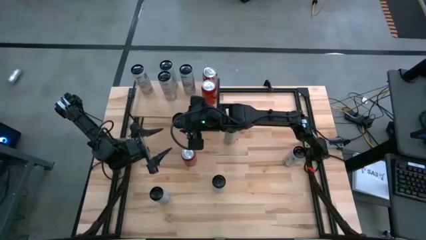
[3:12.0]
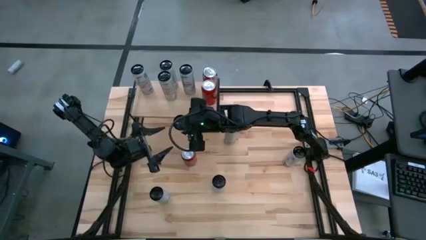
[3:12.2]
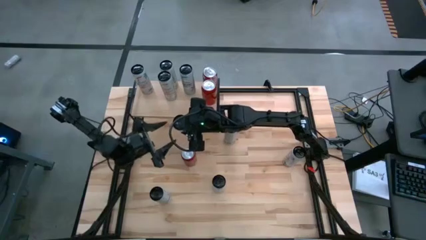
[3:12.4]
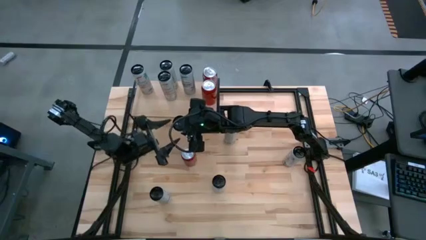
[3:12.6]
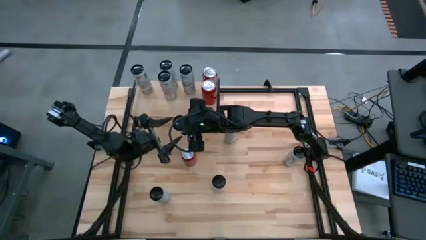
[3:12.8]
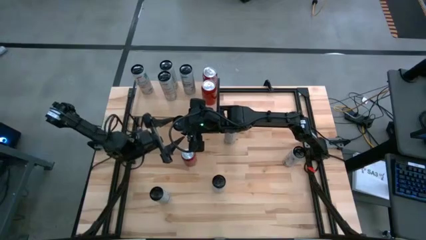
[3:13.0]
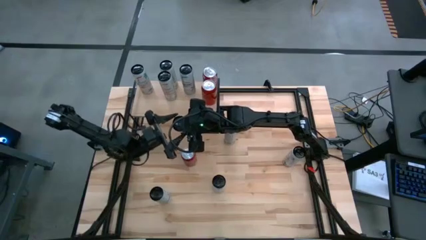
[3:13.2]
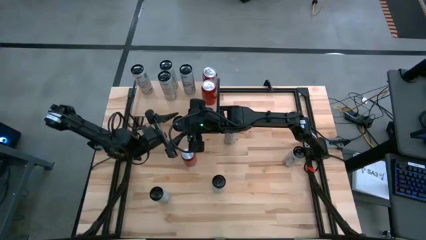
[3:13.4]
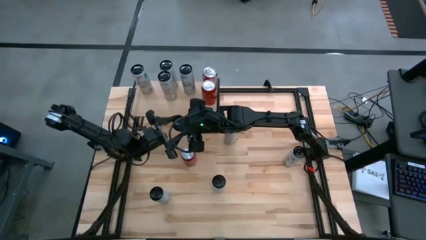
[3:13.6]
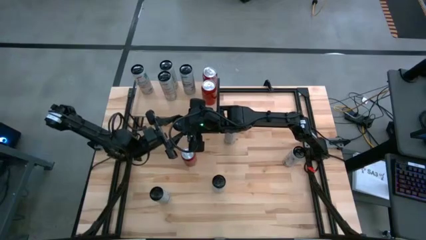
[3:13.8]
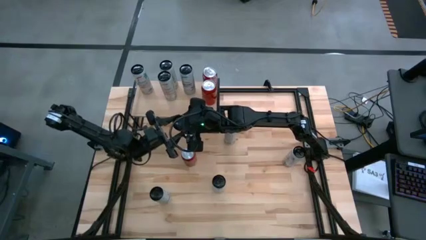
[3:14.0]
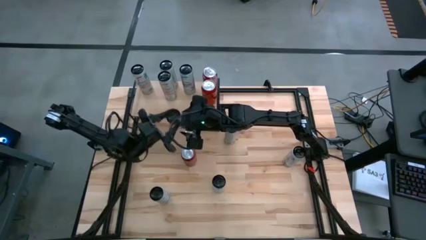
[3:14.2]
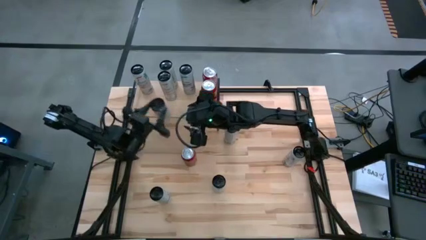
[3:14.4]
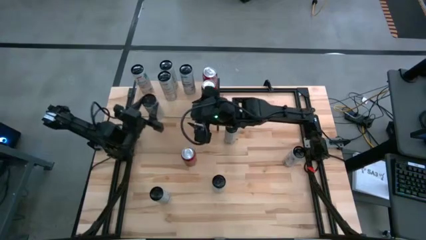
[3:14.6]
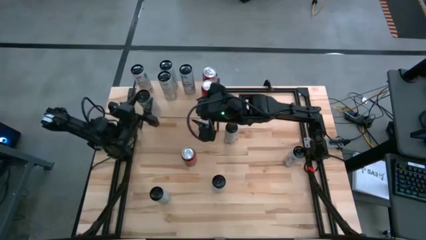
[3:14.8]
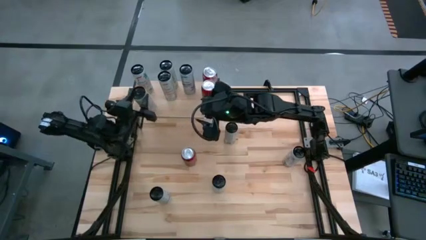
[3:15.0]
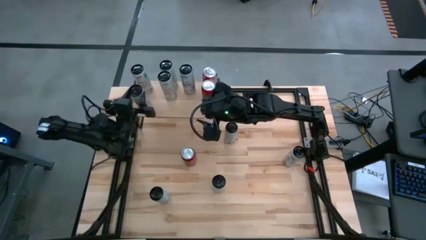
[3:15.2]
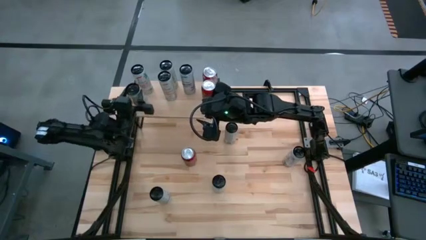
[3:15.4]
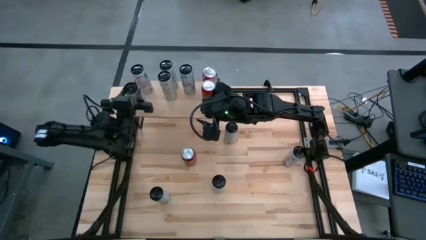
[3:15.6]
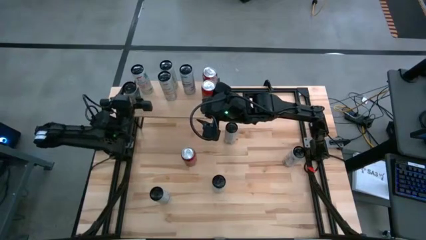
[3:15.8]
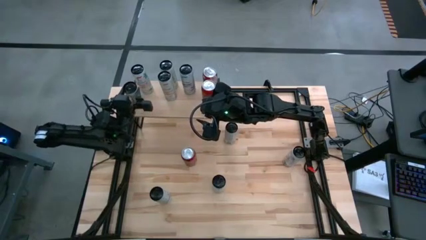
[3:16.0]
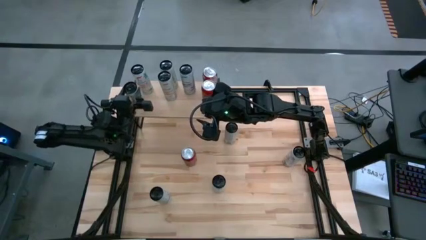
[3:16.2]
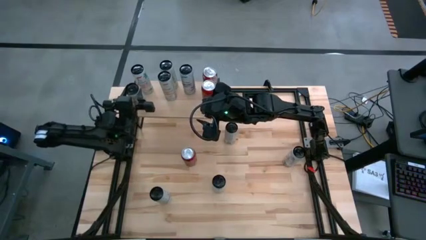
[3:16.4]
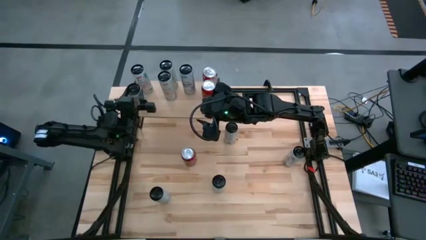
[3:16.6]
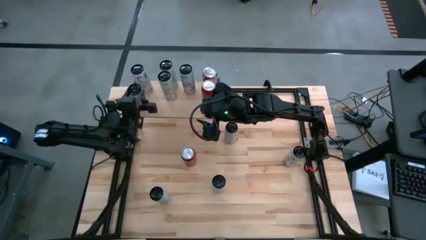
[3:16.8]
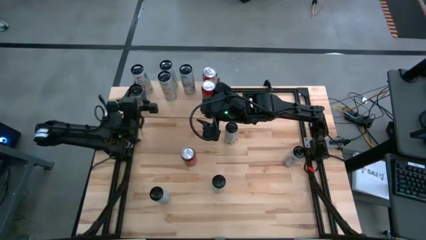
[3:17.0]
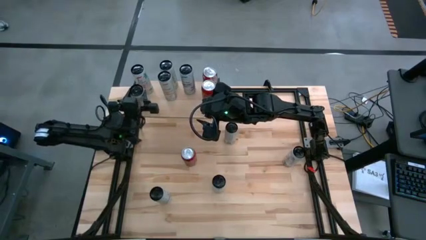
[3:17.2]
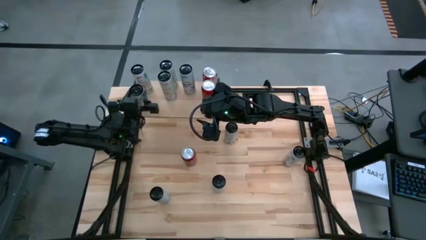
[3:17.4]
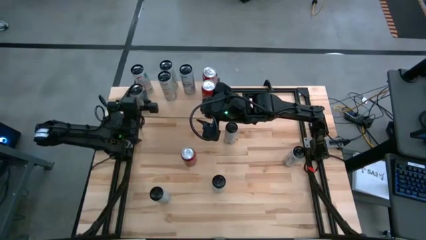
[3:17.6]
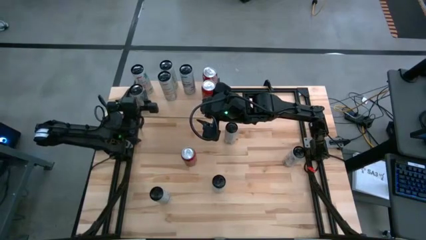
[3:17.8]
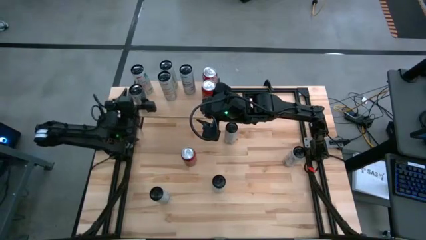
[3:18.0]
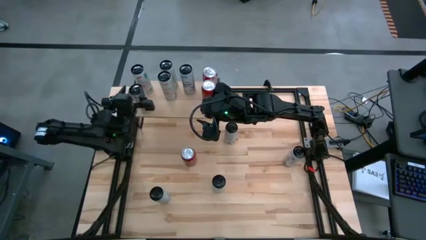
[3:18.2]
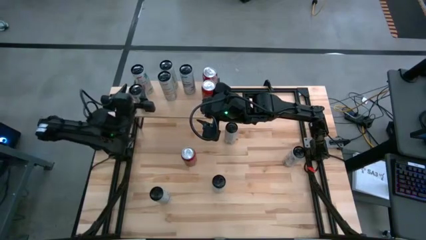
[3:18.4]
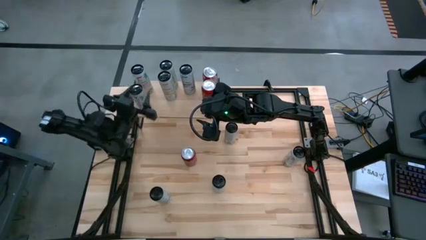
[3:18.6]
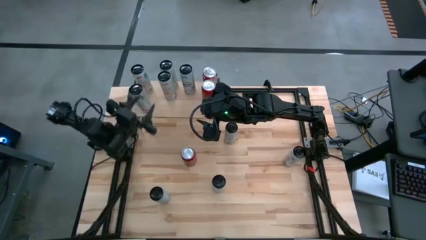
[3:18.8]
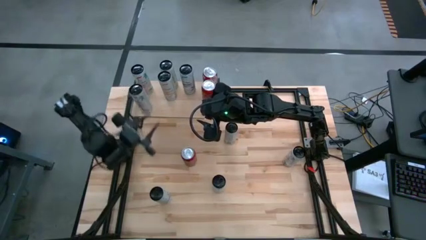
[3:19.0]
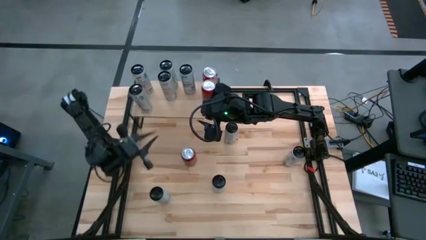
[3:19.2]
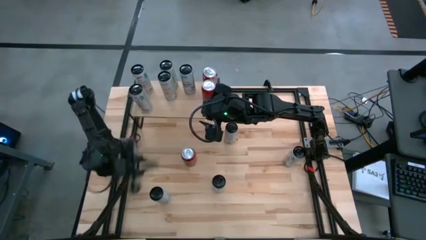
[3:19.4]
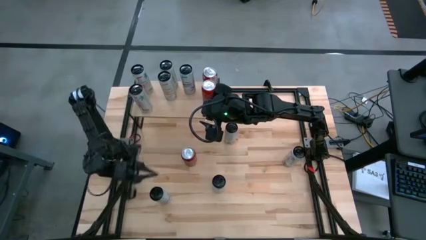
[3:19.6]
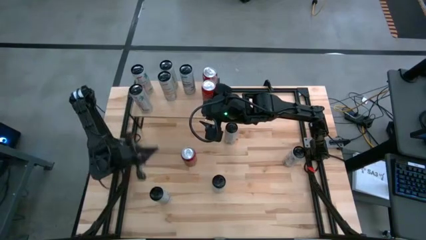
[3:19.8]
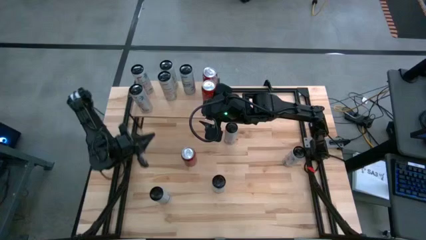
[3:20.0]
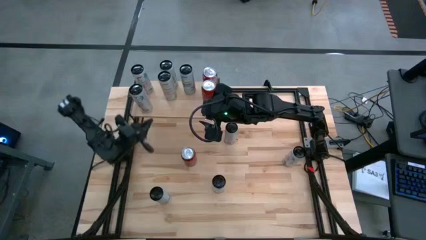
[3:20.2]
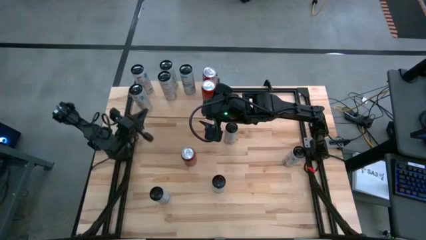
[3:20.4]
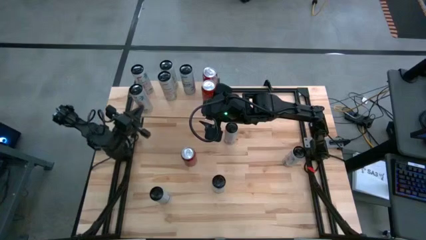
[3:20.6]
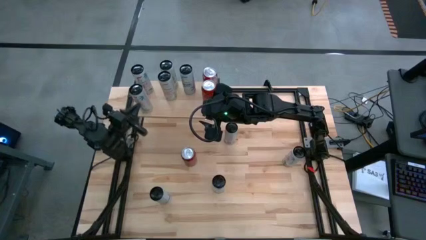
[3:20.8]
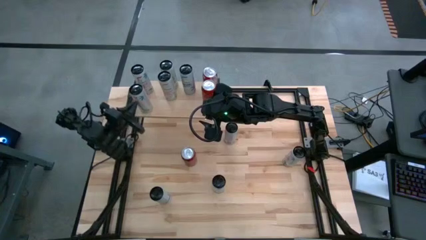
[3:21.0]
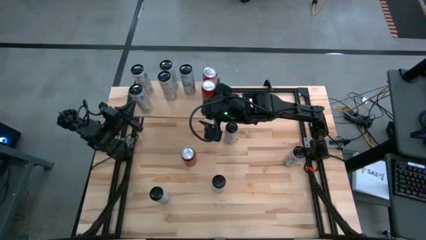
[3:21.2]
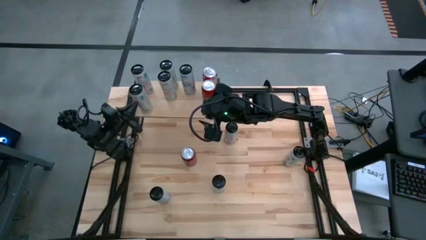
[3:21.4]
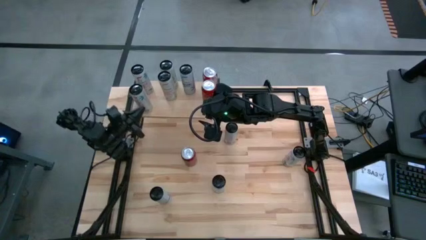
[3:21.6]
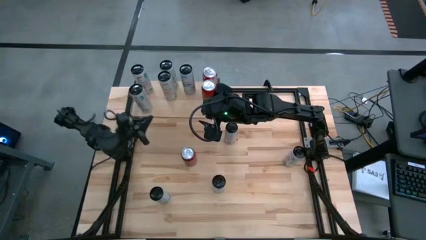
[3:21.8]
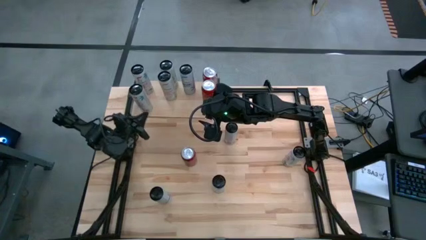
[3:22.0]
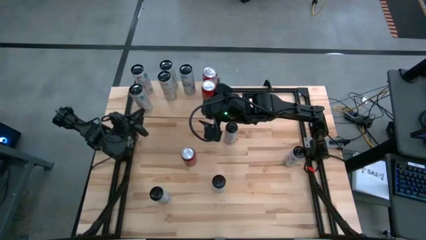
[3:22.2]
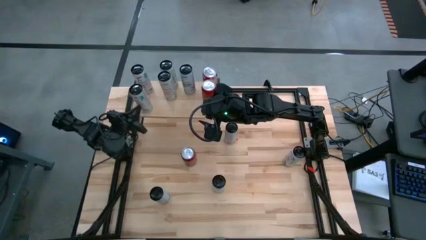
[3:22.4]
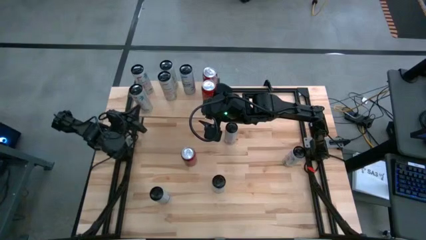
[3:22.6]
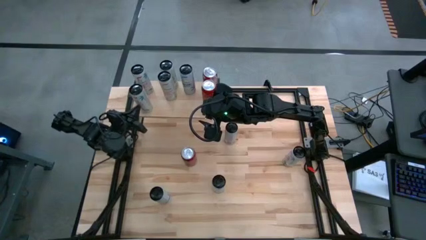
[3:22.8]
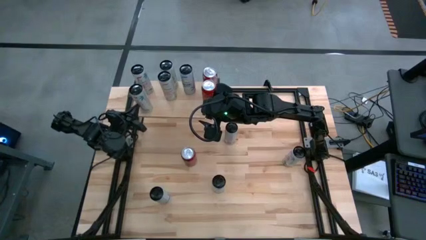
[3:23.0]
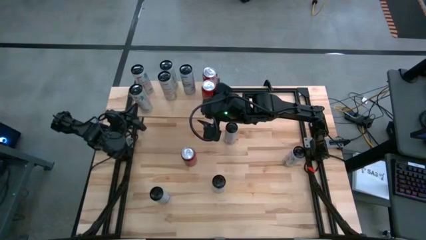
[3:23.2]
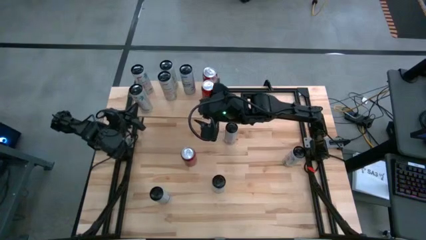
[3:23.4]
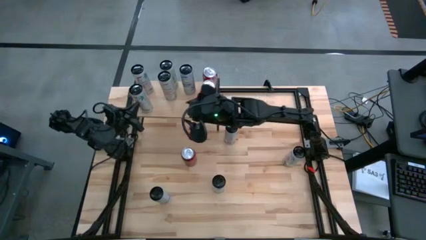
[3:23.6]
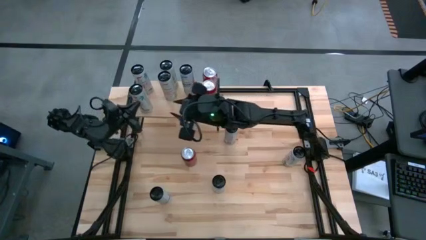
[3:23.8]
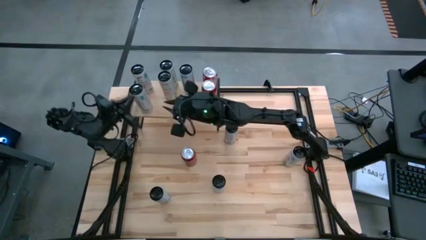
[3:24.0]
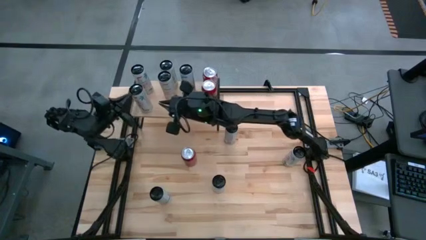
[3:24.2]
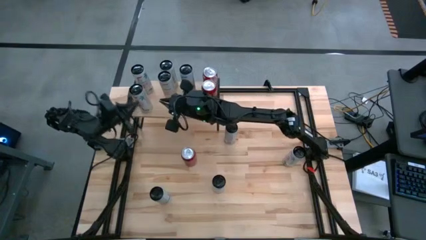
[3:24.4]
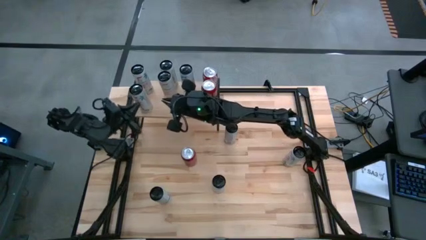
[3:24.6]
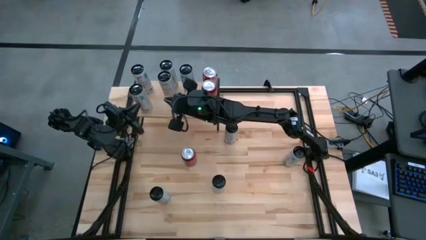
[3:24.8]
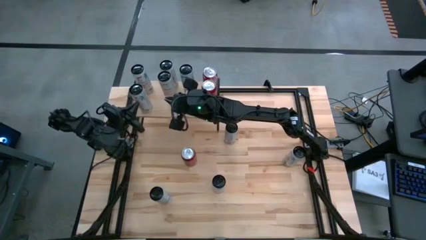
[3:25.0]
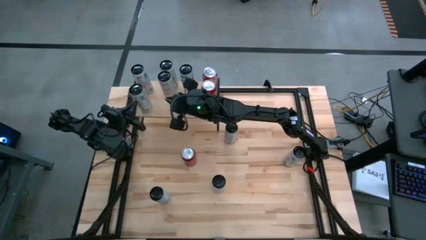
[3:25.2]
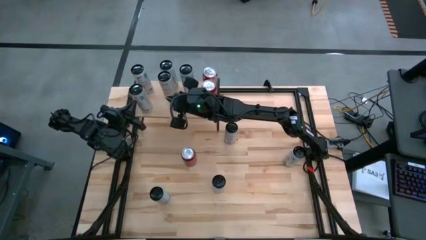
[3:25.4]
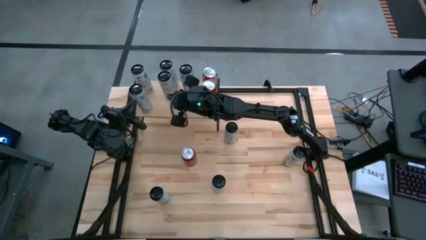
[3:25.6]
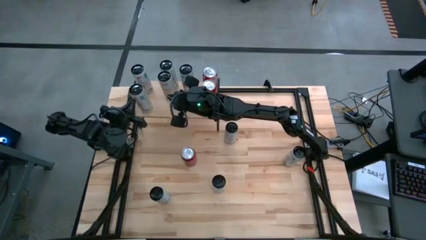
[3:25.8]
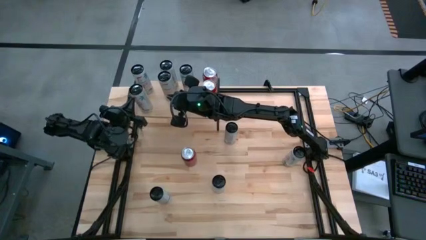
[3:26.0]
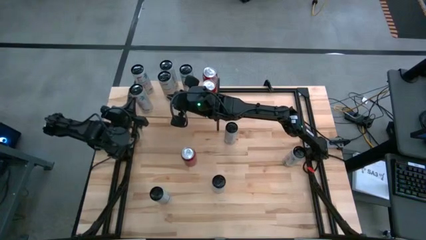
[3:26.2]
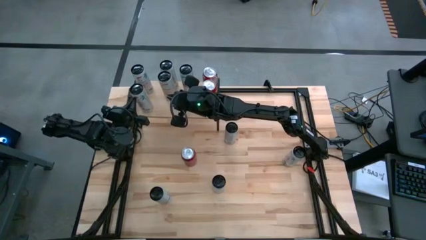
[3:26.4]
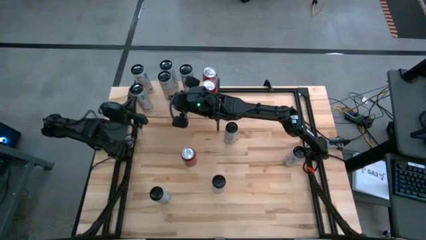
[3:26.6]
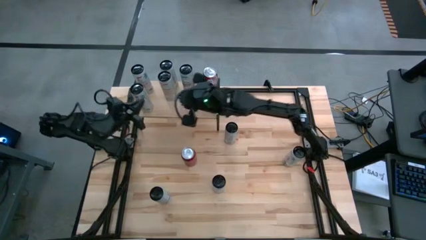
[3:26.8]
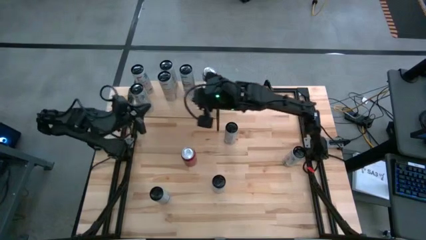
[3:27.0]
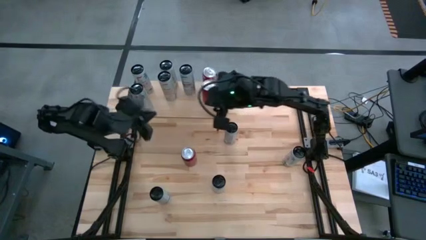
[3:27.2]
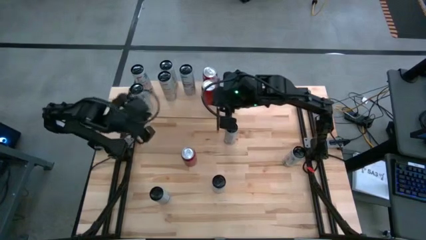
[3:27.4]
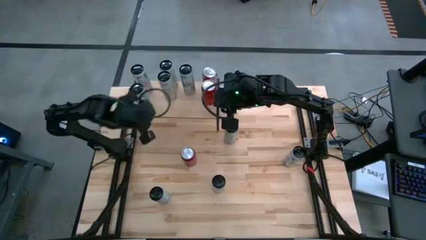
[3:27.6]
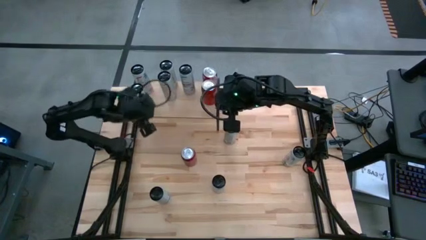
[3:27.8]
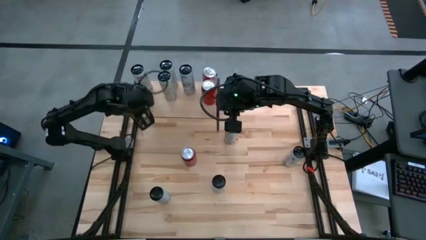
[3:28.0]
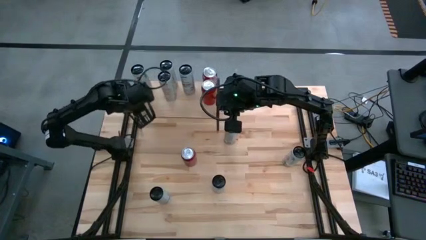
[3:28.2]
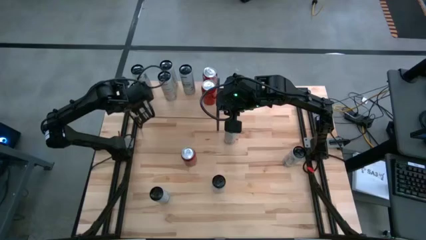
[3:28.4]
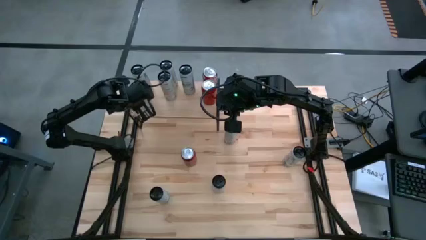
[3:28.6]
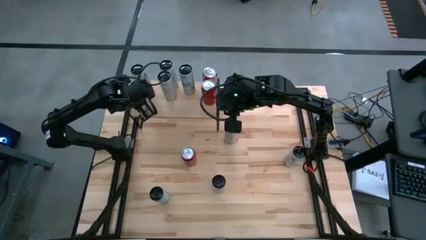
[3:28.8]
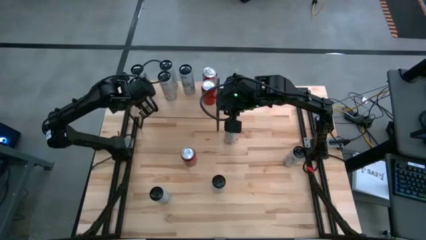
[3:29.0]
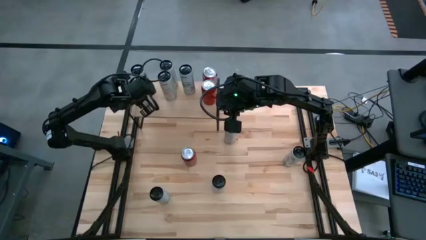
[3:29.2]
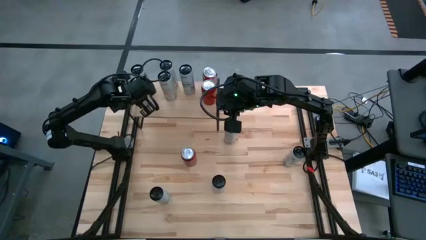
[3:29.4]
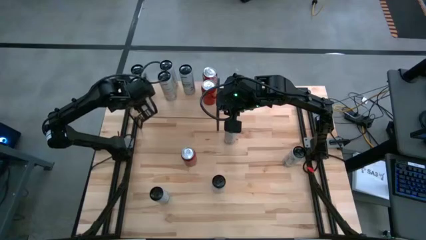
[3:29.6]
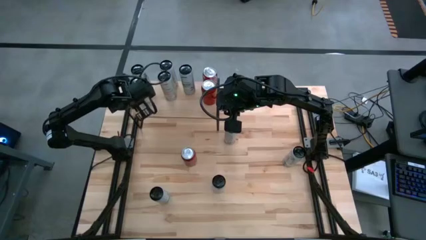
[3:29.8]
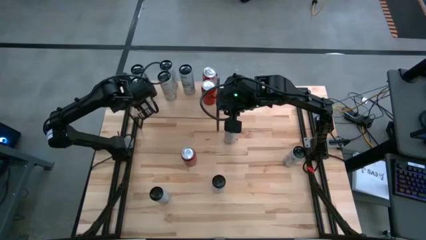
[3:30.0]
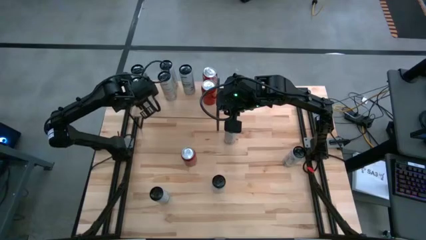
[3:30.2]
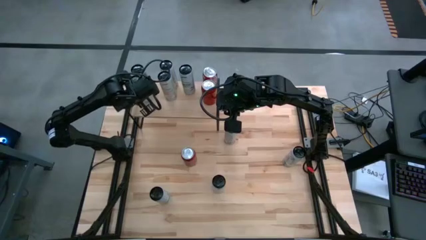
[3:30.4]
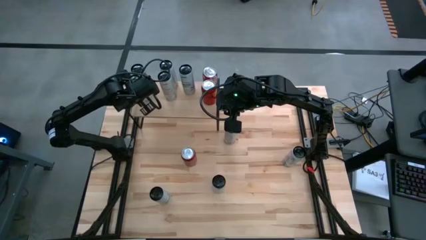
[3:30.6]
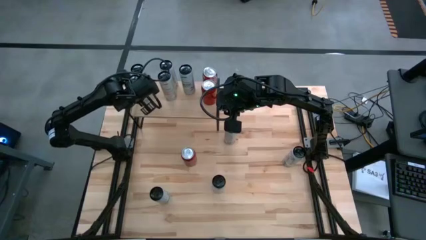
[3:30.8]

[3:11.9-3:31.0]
Task: Place canned beverage on shelf
Put the top white pink soda can on the shelf aligned with the other white pink soda can
